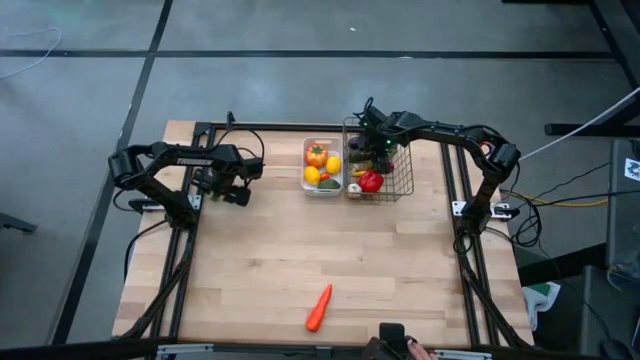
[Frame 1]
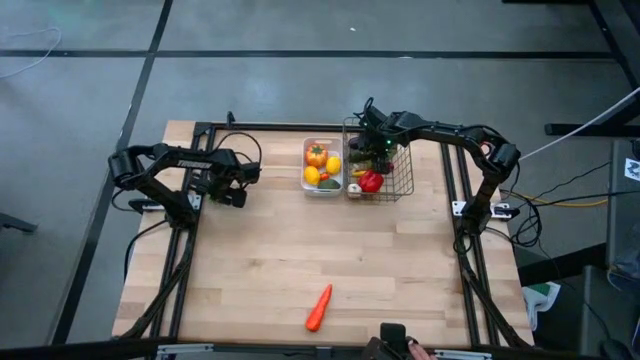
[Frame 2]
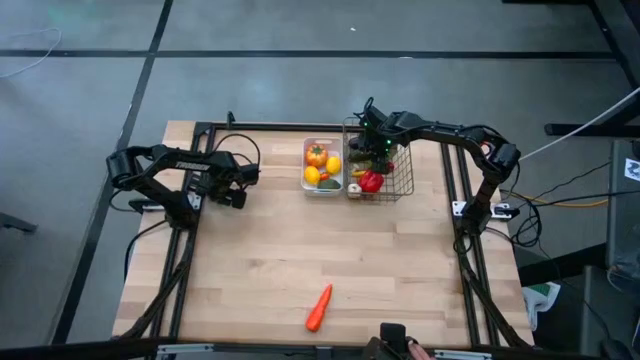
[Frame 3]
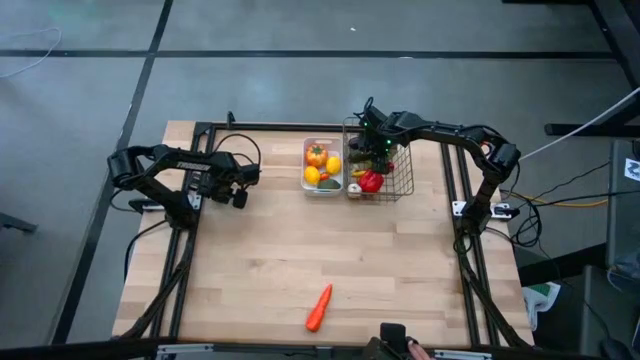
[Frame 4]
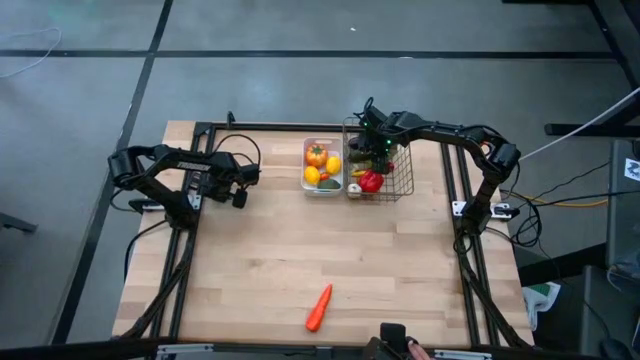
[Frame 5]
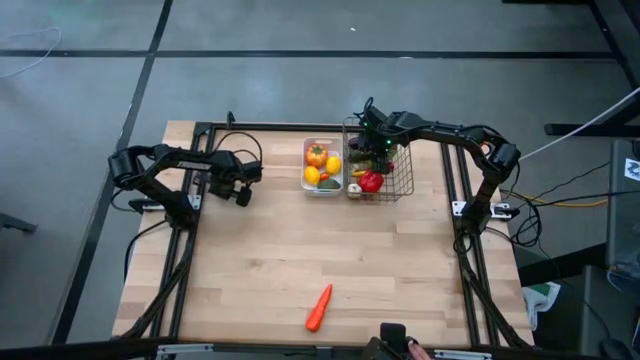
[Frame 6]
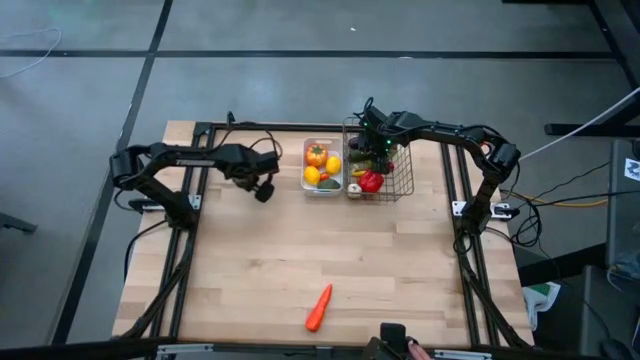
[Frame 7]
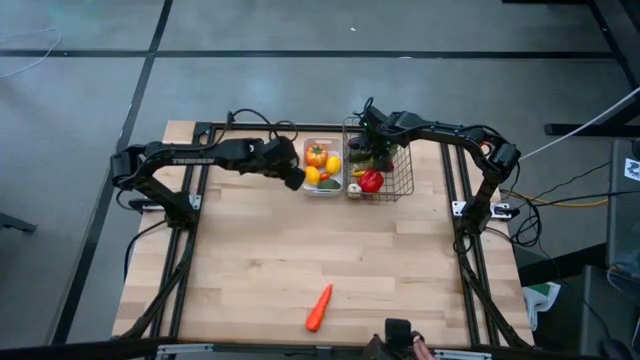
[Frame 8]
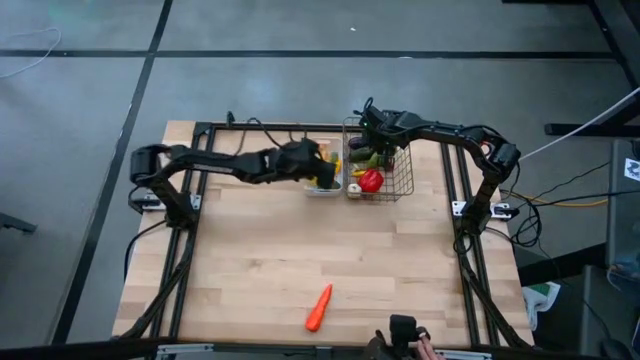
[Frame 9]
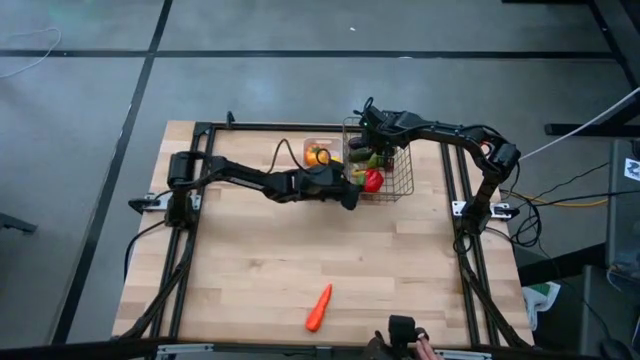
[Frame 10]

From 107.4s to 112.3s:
Task: Sort produce into baskets
Put the green bell pepper into the gold wire basket

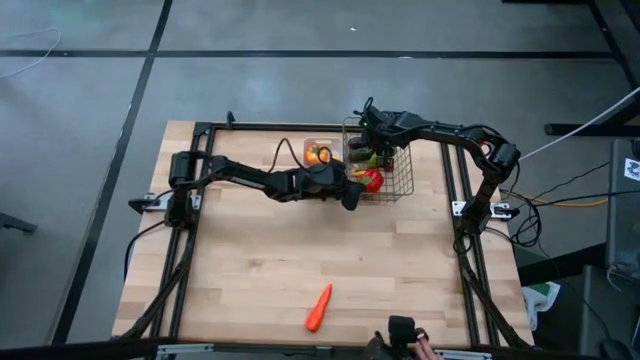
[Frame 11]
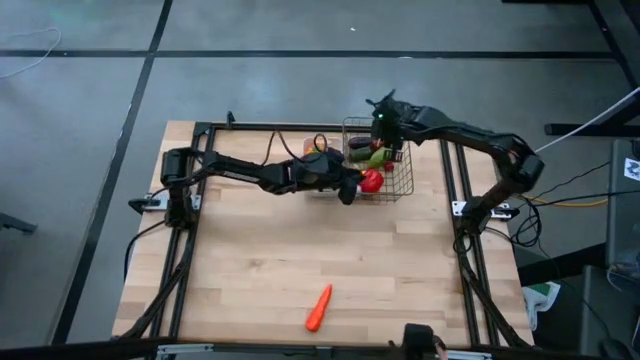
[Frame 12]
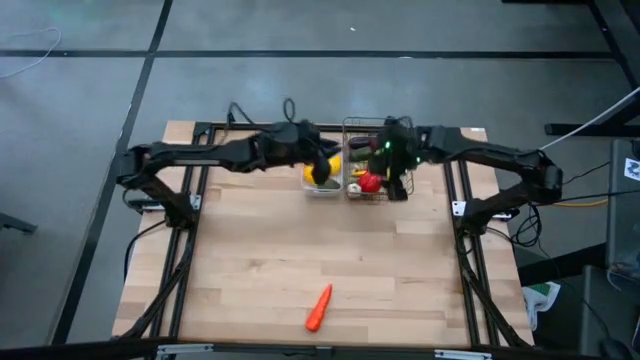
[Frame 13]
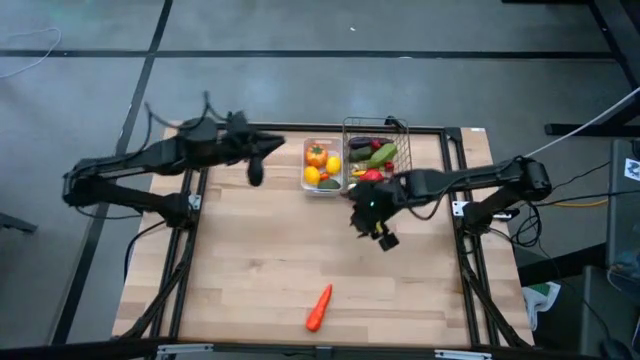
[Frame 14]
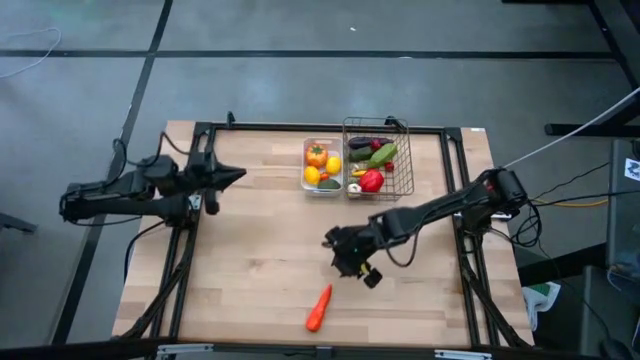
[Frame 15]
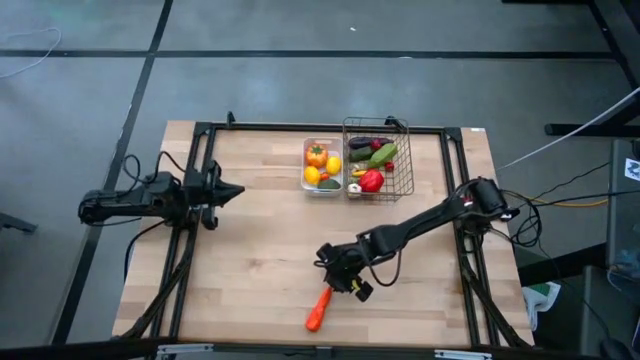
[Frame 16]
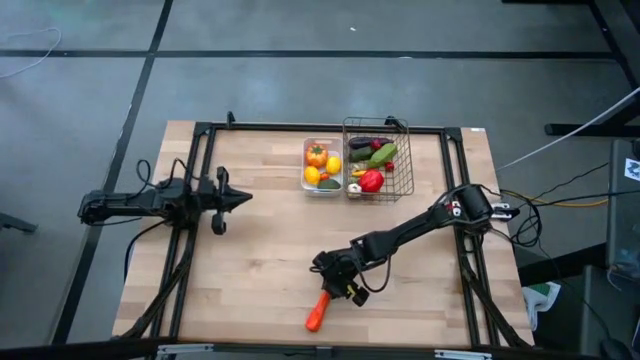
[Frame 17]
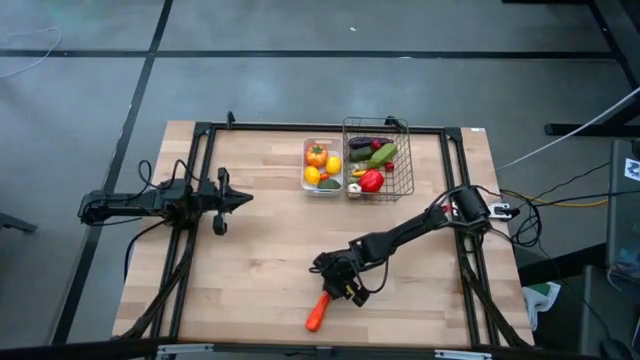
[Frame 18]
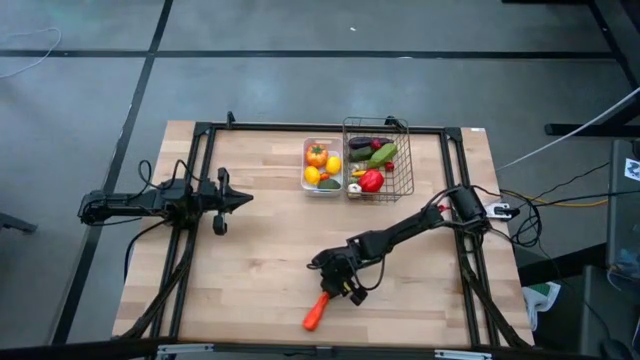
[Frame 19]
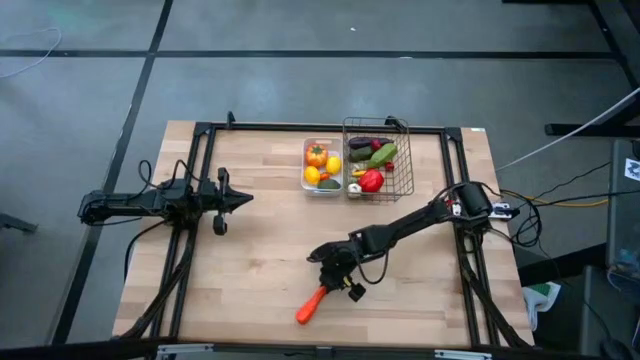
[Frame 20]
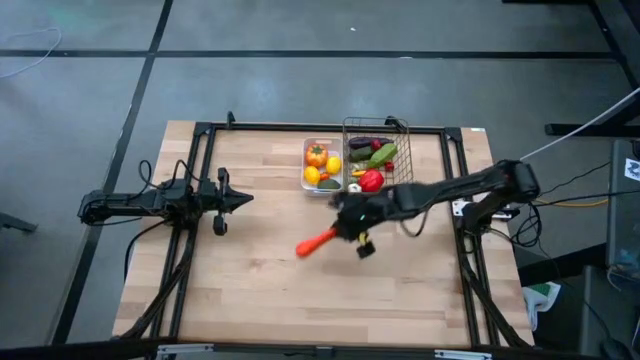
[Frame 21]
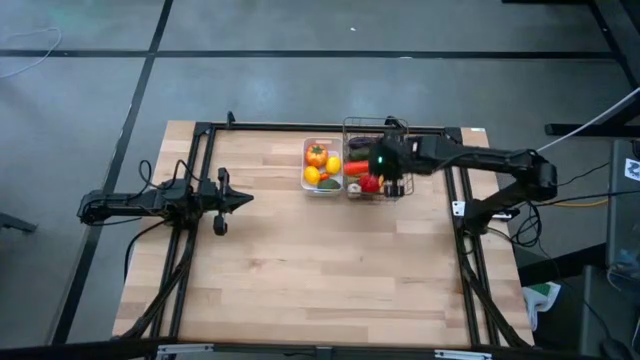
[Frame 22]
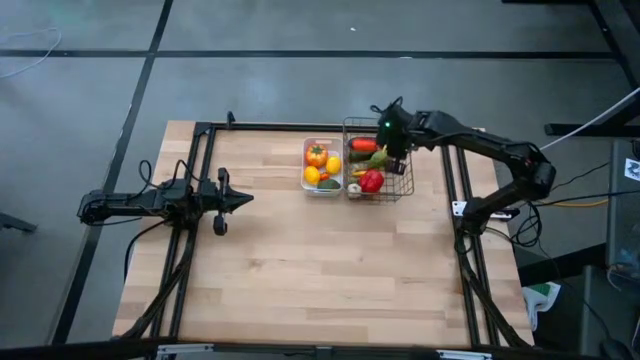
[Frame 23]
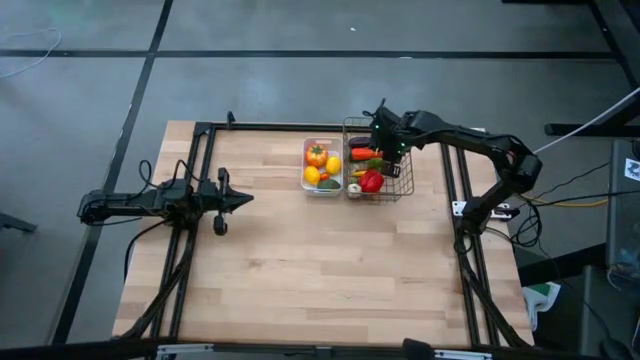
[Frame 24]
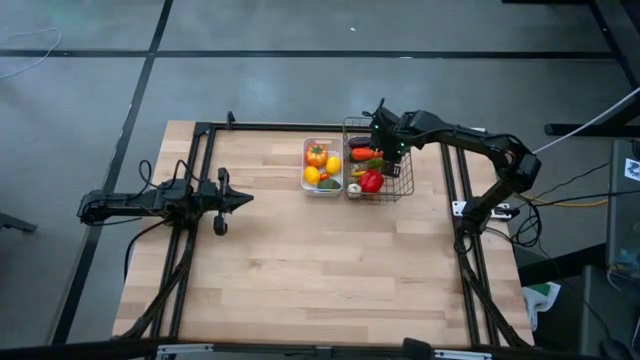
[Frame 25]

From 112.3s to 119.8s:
Put the orange carrot into the gold wire basket

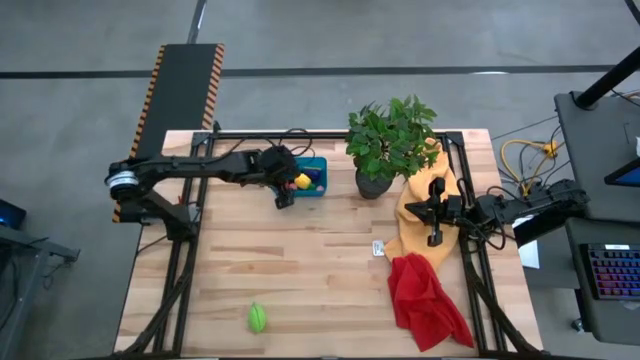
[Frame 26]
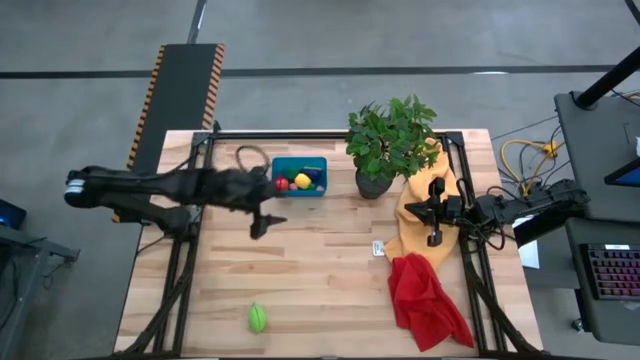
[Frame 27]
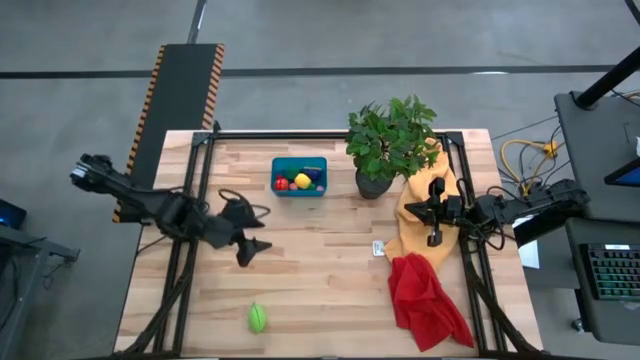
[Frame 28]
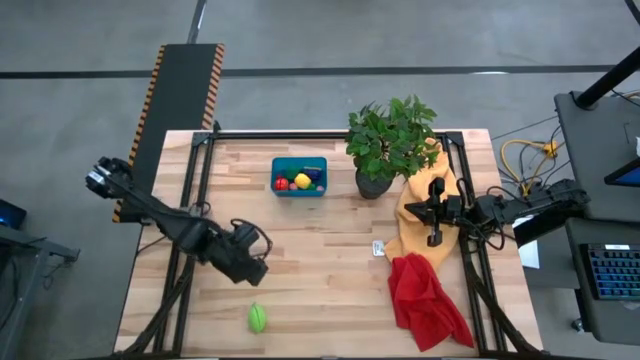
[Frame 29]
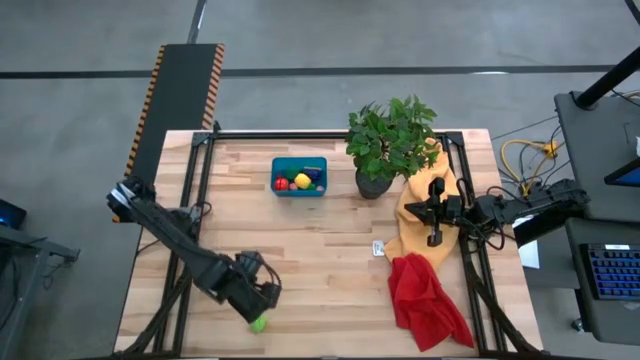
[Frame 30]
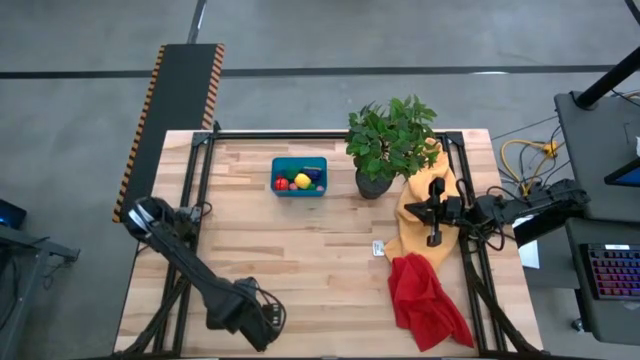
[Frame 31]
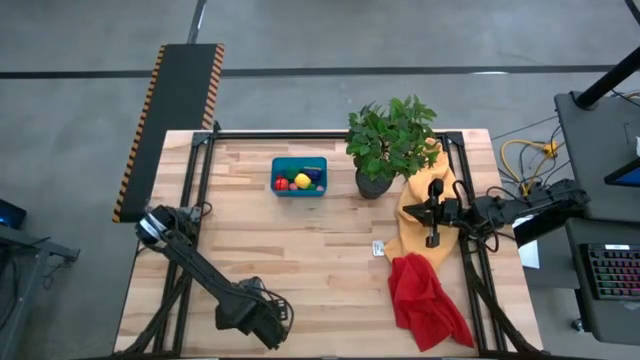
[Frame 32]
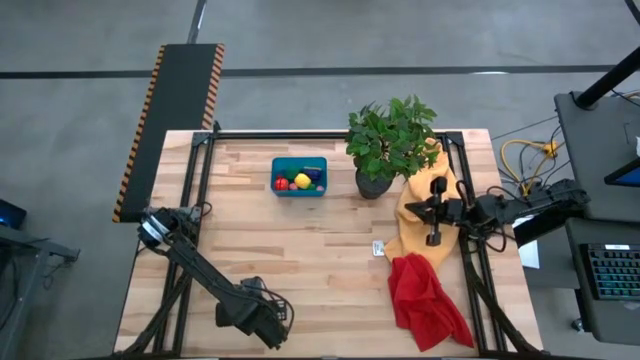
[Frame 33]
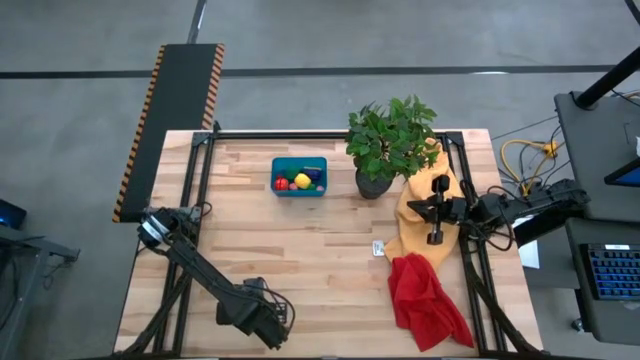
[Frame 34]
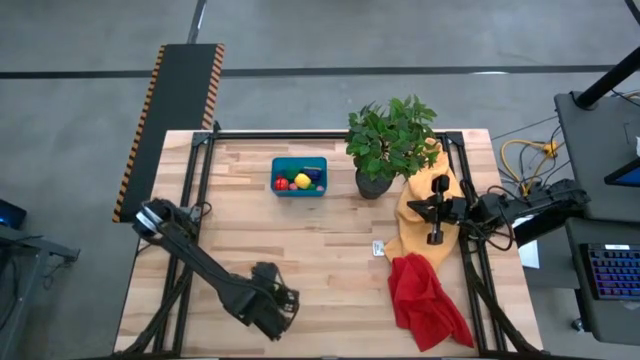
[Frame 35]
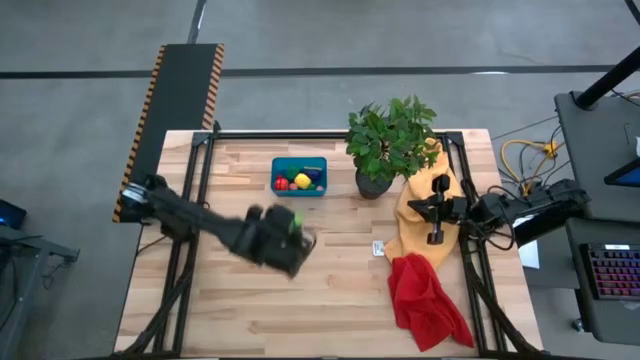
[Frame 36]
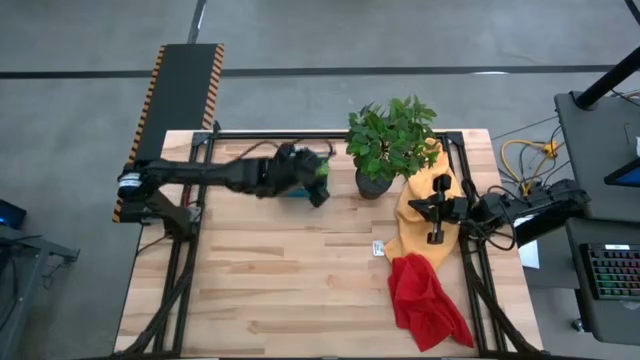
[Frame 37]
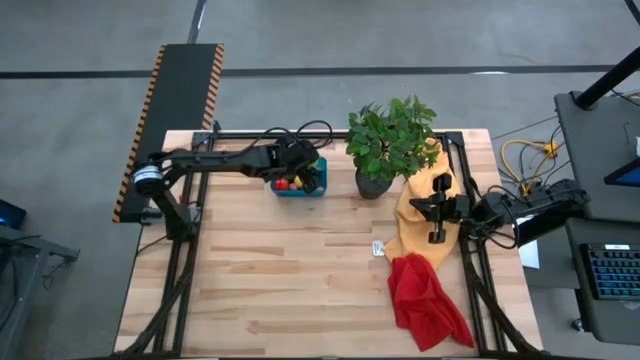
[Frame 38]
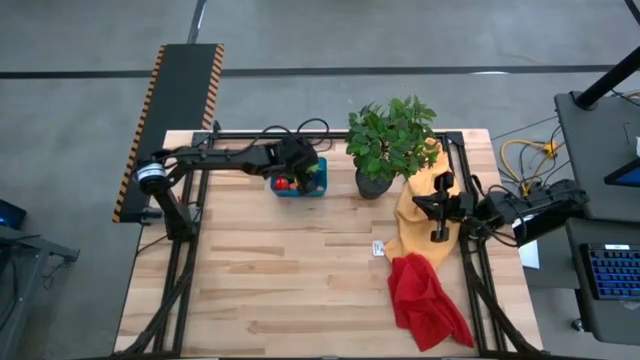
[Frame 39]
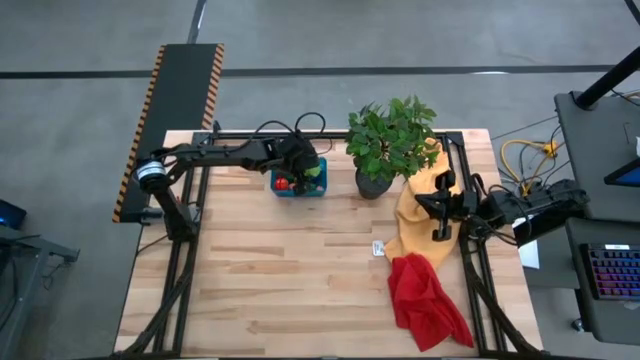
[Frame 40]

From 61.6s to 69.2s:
Task: Pick and placing Produce into tupperware
Put the melon into the bin

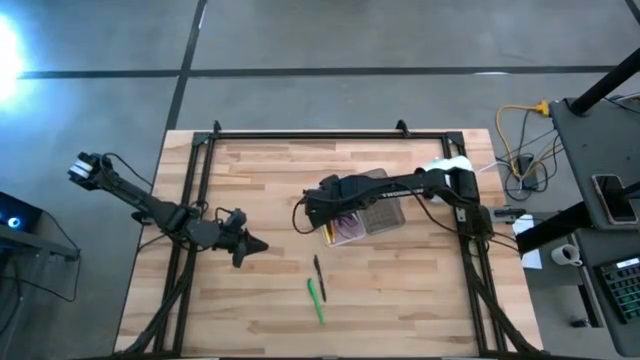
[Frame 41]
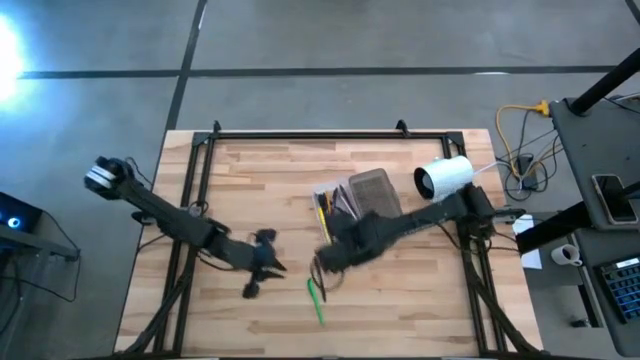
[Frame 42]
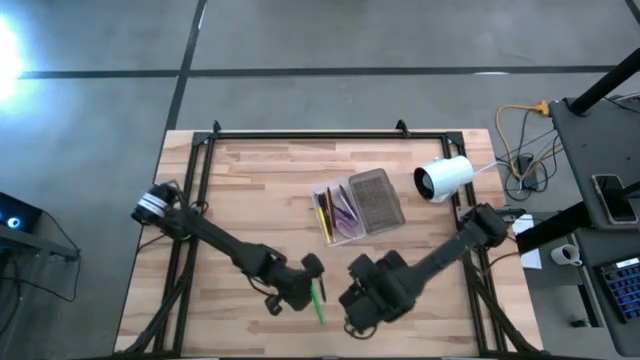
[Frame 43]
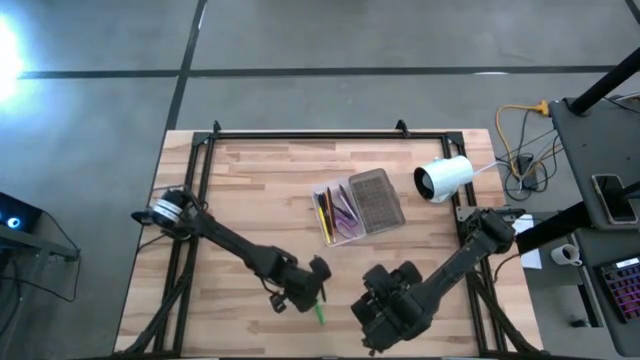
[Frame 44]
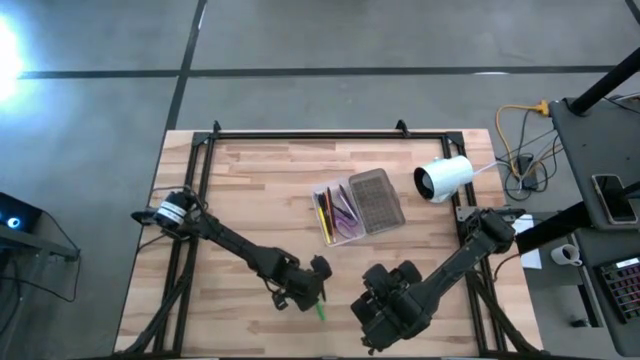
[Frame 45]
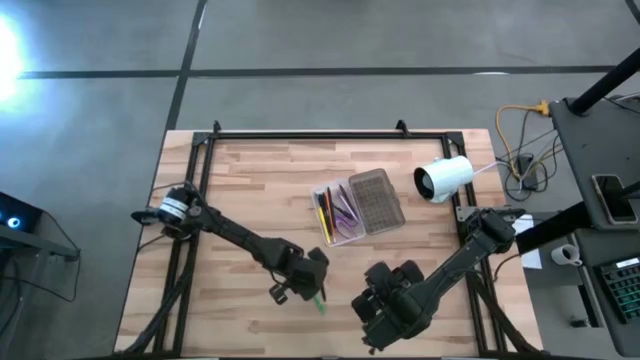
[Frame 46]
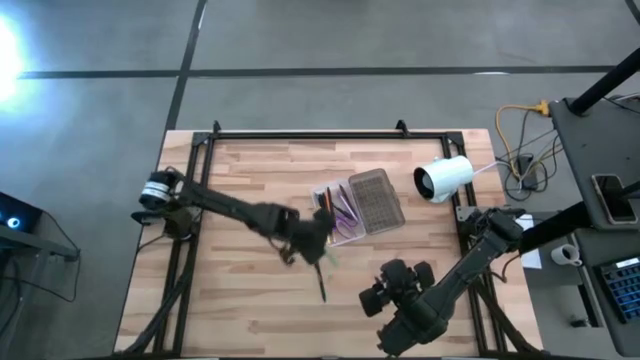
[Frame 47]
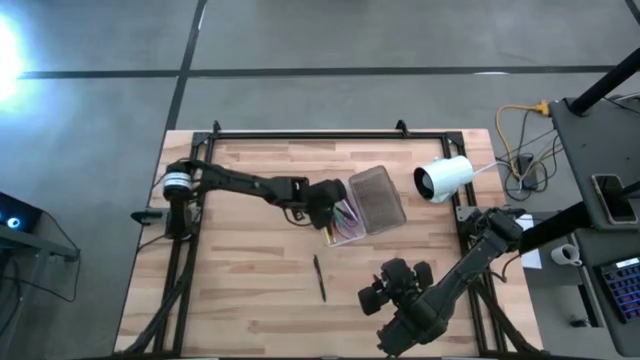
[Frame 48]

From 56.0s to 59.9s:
Task: Pick & place school supplies into a supply box
Put the green pen into the supply box
